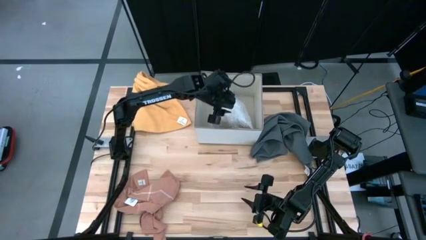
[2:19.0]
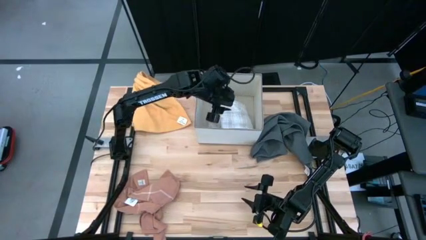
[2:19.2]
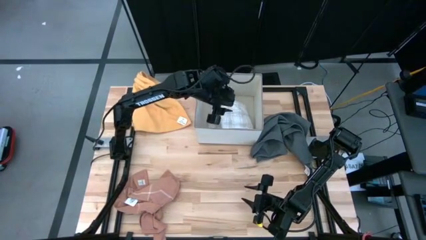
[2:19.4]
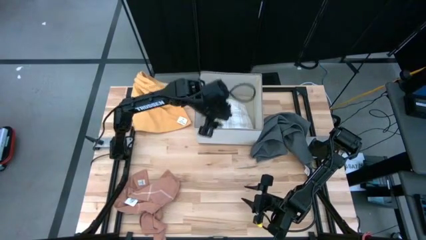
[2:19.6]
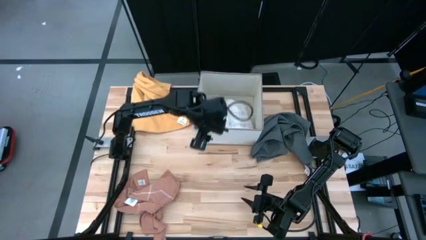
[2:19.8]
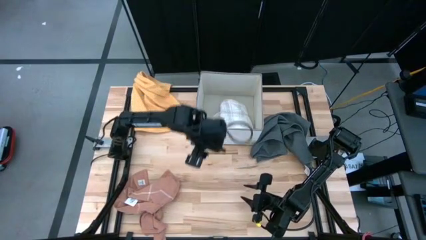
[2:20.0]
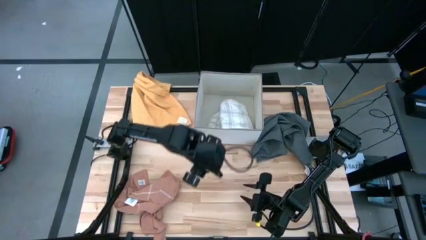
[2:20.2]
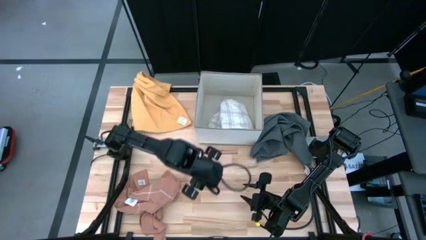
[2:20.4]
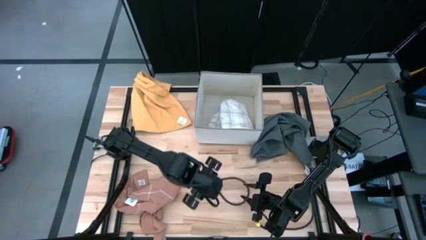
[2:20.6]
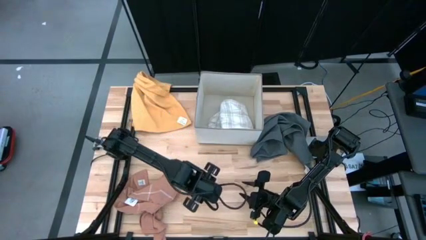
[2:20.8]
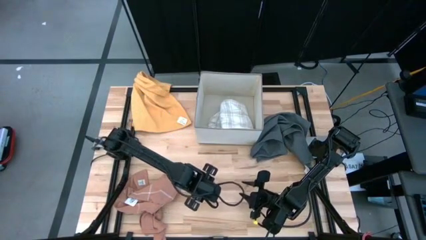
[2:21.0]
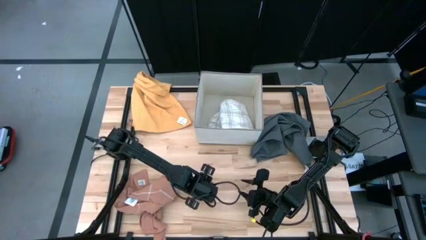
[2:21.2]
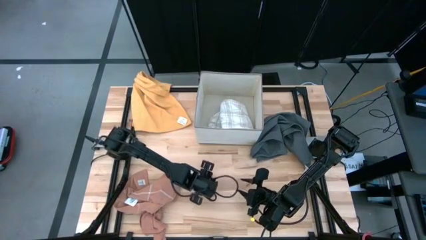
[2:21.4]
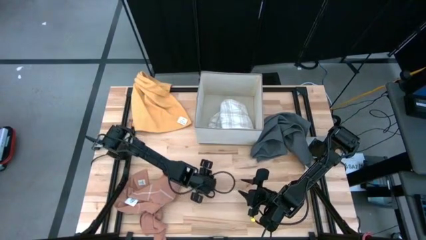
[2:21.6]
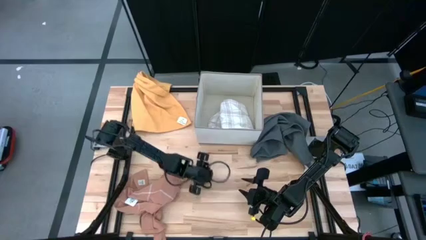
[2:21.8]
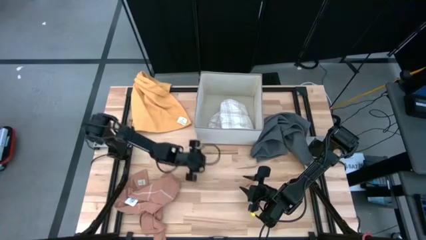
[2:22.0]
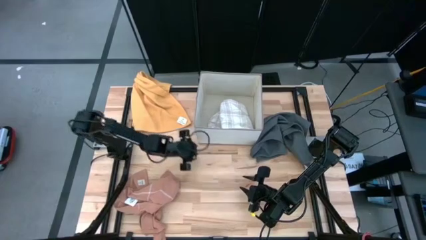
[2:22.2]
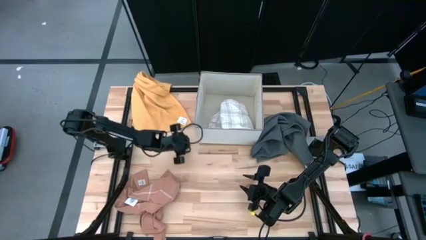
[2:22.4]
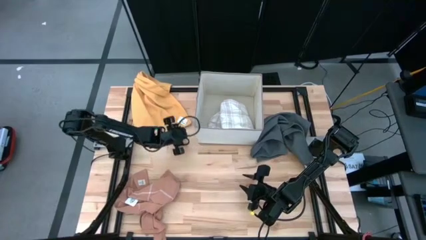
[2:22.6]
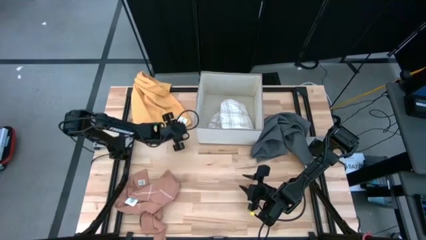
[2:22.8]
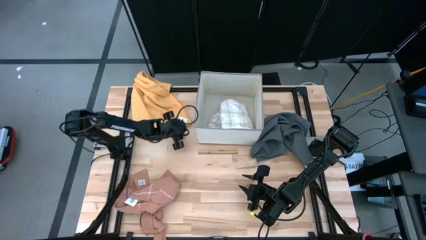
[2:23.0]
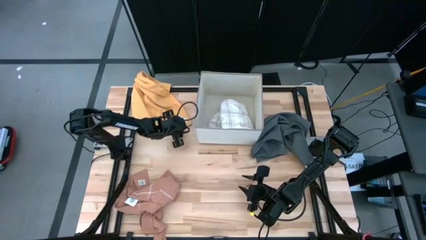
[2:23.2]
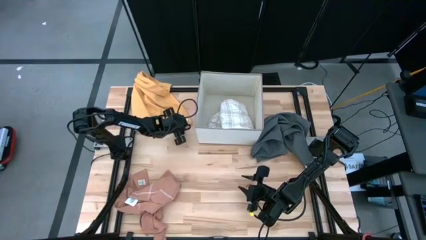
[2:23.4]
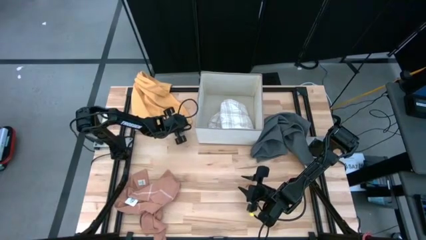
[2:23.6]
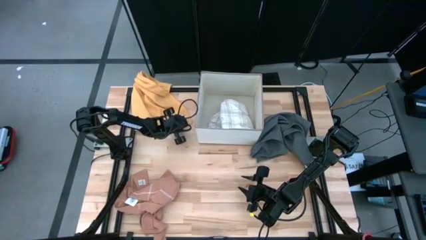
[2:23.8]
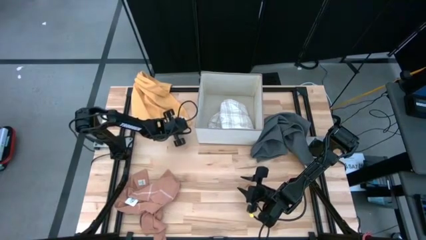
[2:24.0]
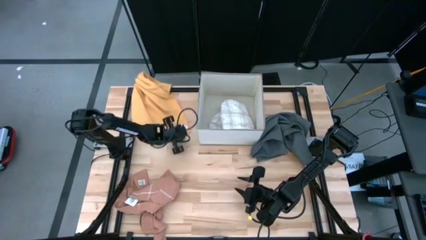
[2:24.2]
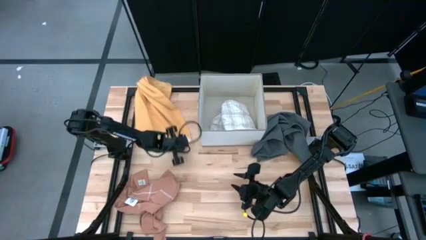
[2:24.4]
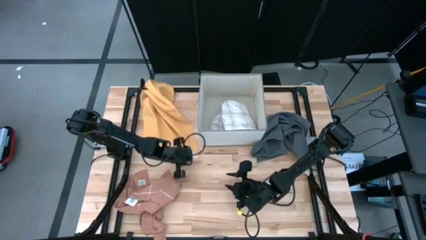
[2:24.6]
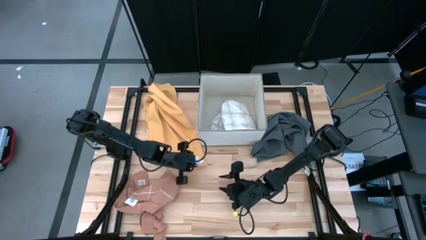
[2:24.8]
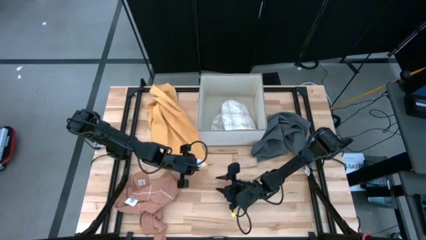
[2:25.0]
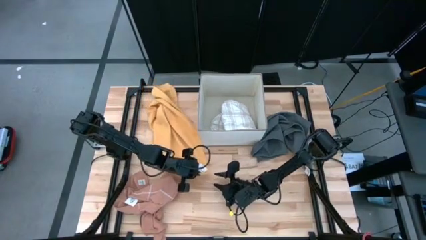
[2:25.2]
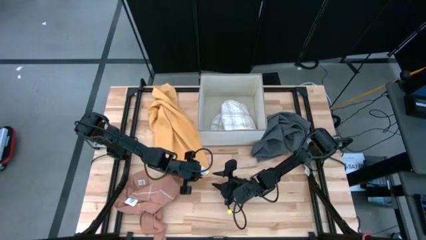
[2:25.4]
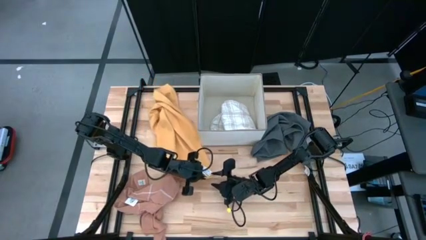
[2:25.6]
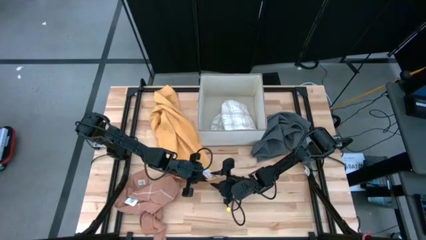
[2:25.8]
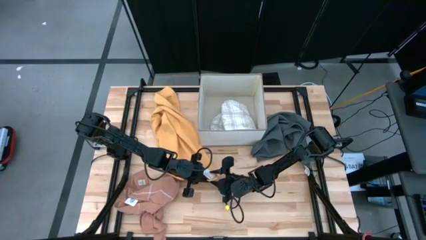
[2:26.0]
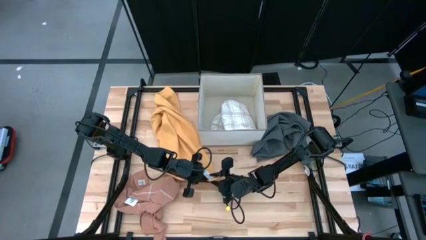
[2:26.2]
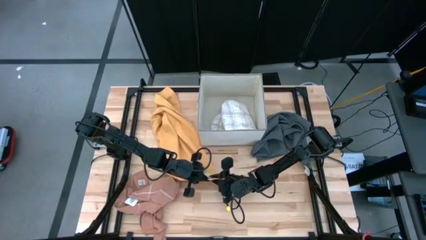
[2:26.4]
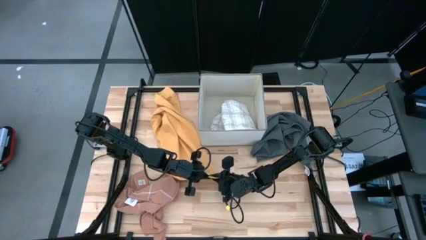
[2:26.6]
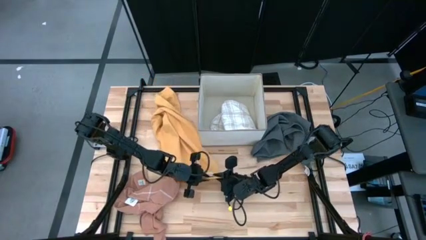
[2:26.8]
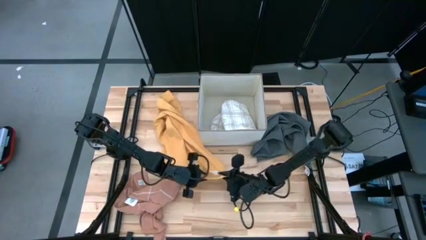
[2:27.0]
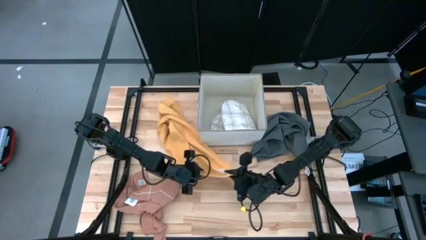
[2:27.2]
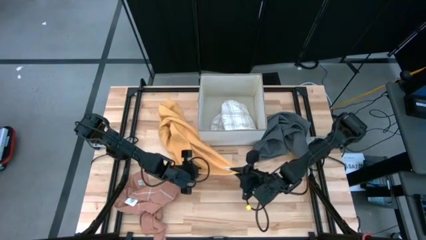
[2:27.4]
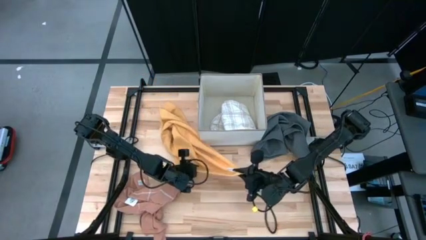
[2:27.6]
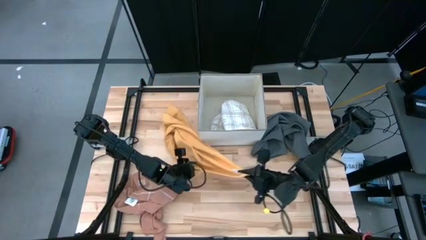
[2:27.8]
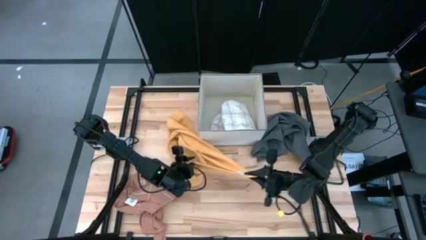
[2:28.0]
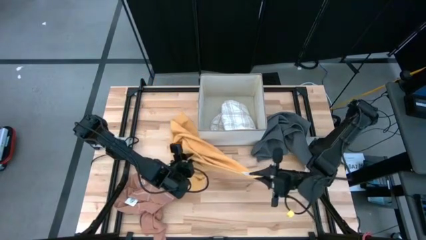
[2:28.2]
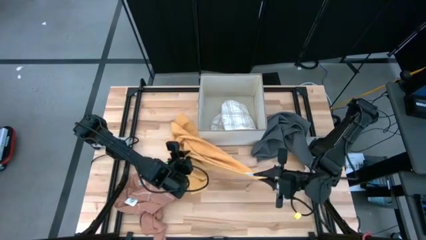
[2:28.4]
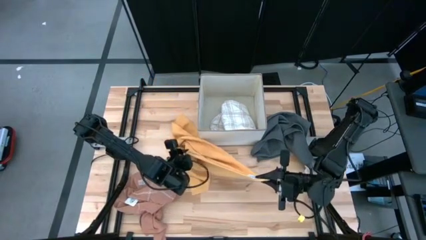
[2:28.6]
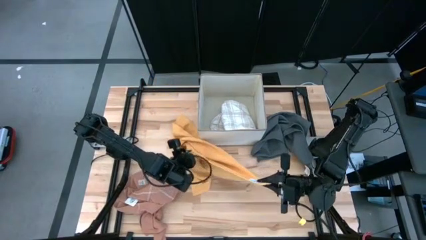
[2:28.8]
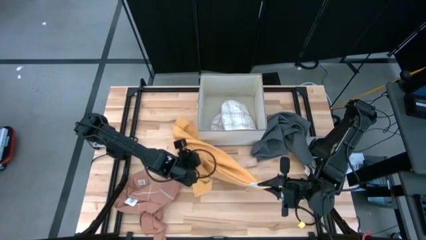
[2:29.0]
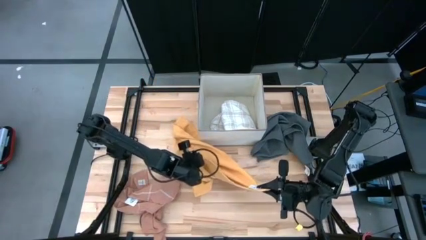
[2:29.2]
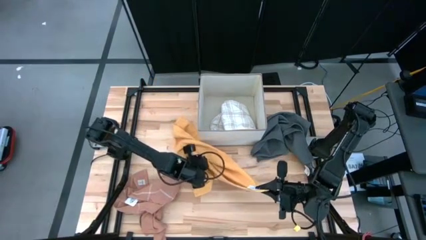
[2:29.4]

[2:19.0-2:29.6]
Task: Fold towel
Fold the yellow towel
